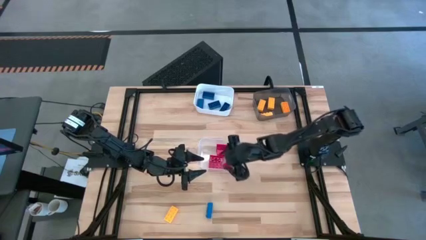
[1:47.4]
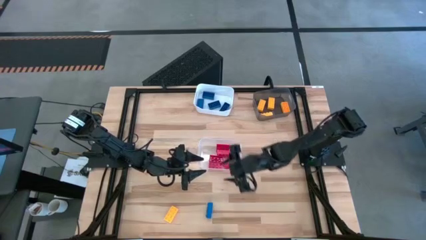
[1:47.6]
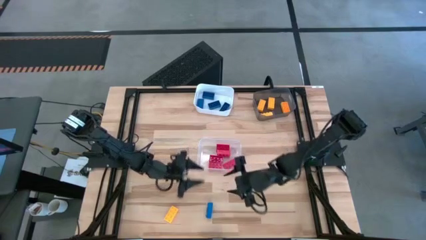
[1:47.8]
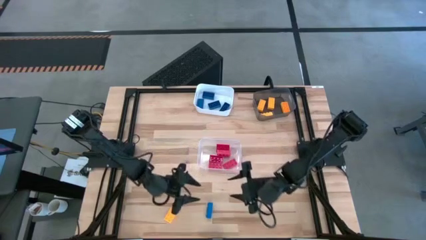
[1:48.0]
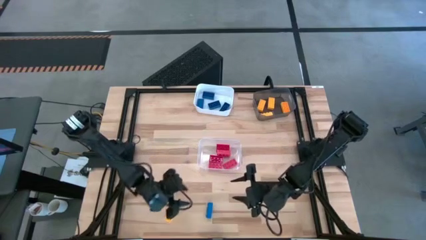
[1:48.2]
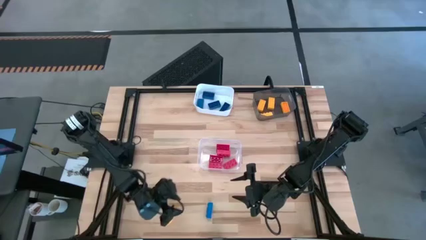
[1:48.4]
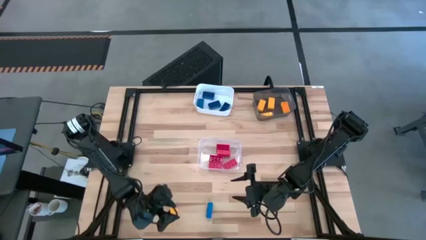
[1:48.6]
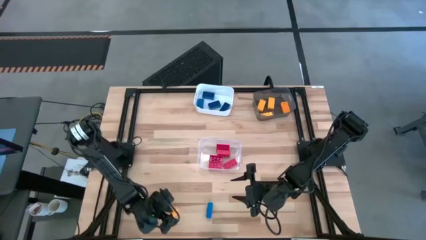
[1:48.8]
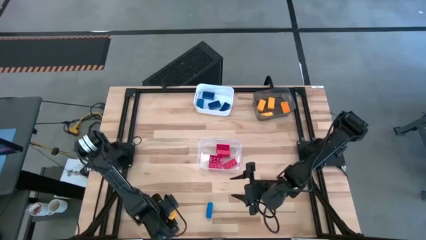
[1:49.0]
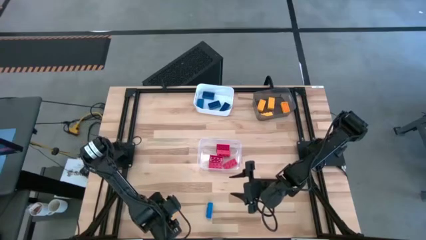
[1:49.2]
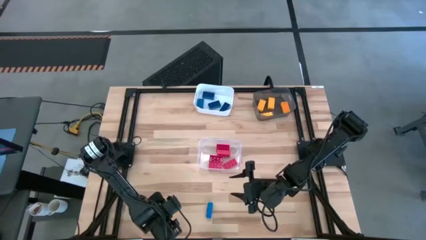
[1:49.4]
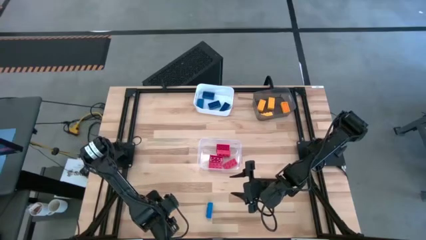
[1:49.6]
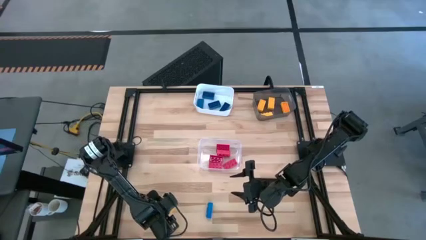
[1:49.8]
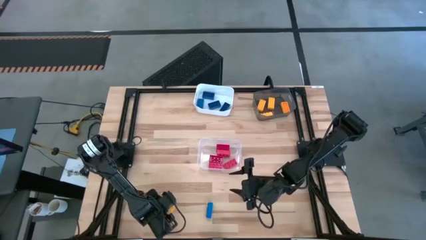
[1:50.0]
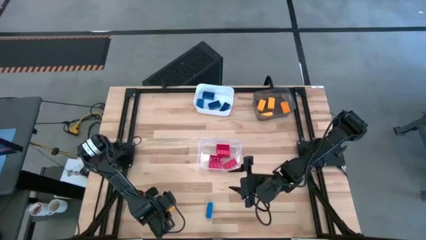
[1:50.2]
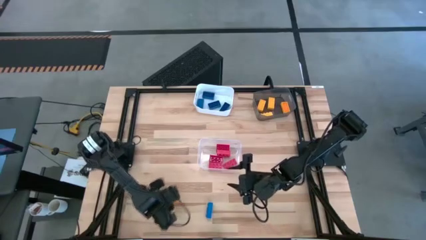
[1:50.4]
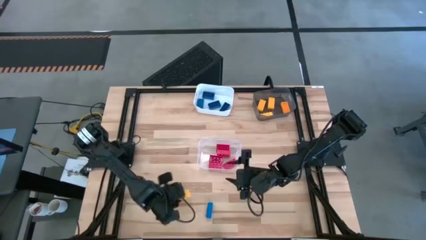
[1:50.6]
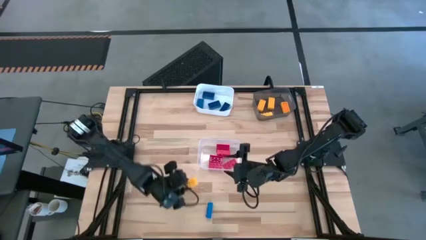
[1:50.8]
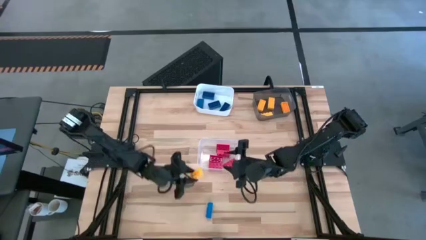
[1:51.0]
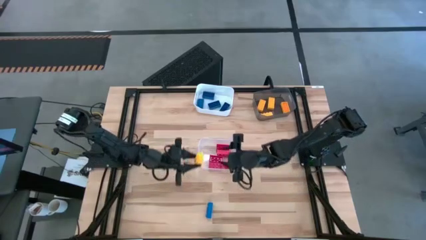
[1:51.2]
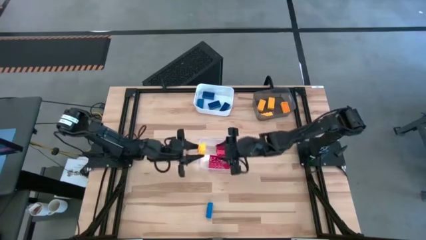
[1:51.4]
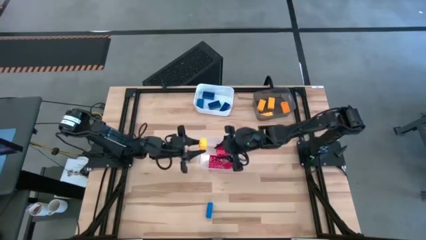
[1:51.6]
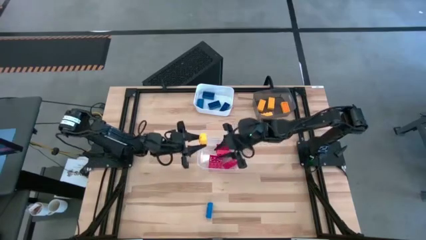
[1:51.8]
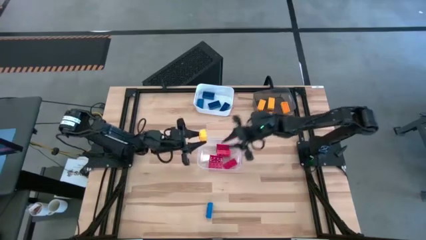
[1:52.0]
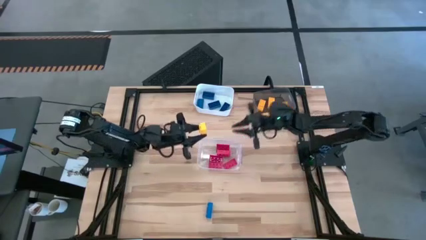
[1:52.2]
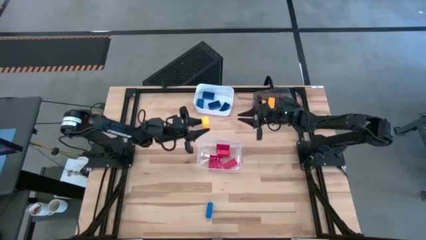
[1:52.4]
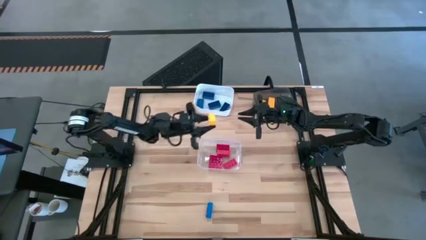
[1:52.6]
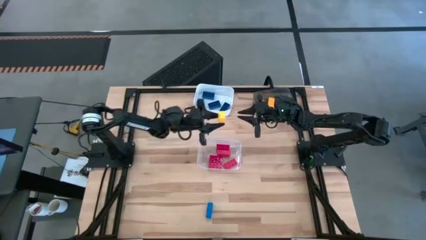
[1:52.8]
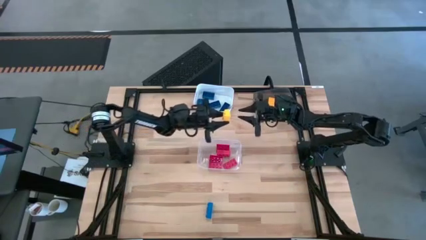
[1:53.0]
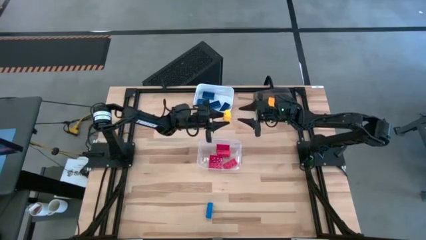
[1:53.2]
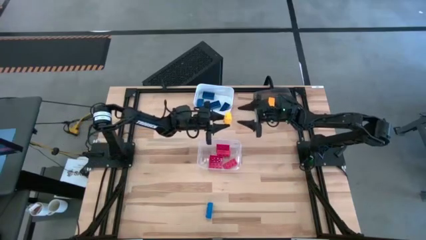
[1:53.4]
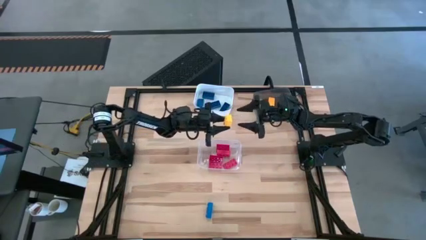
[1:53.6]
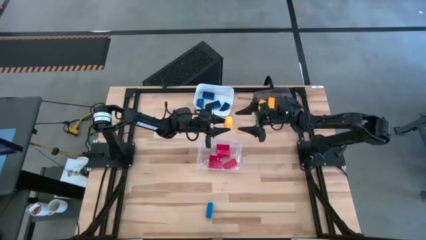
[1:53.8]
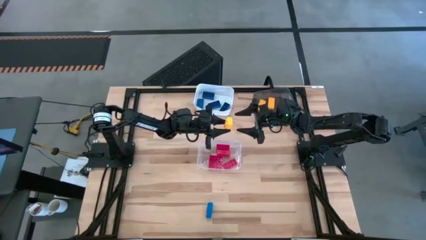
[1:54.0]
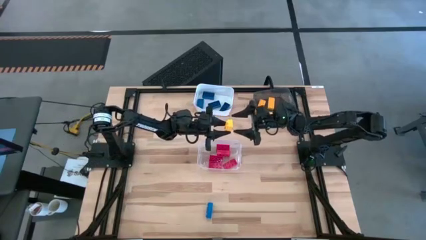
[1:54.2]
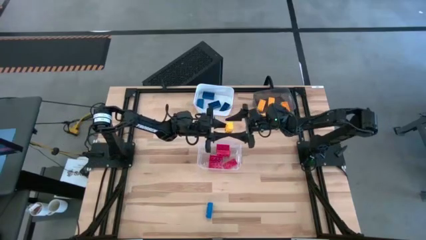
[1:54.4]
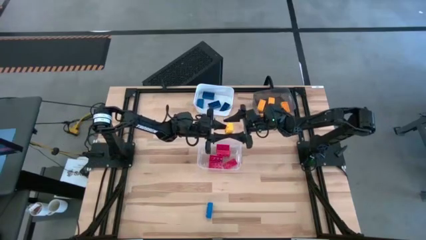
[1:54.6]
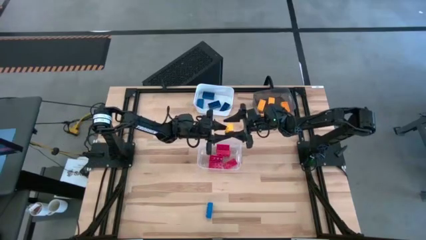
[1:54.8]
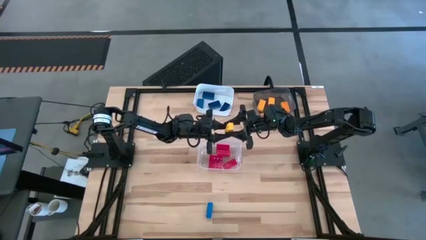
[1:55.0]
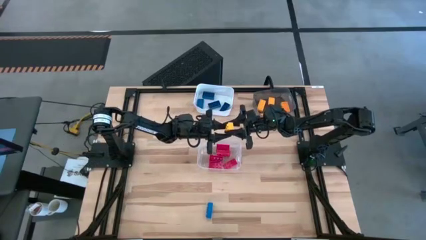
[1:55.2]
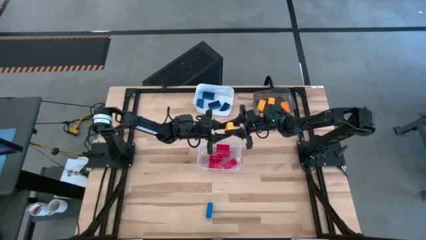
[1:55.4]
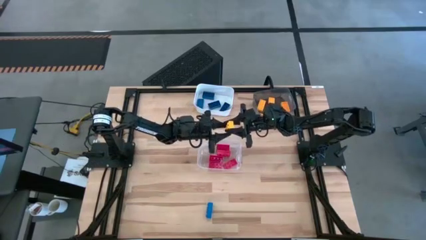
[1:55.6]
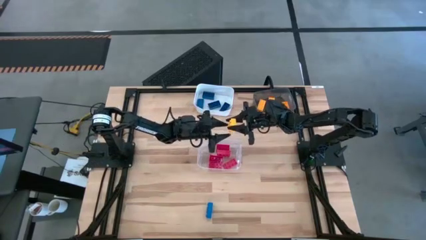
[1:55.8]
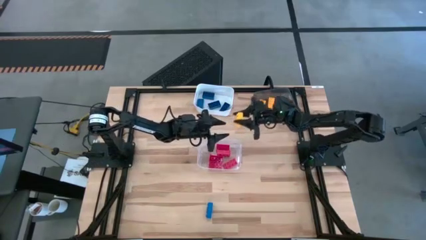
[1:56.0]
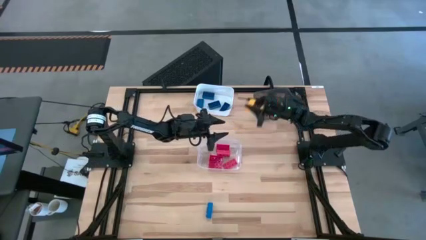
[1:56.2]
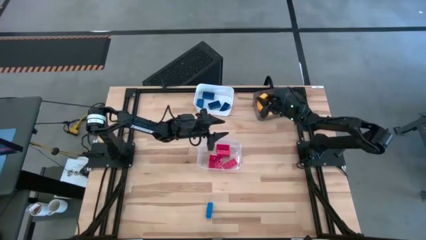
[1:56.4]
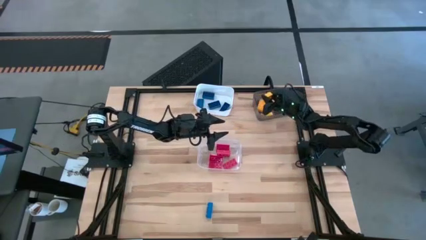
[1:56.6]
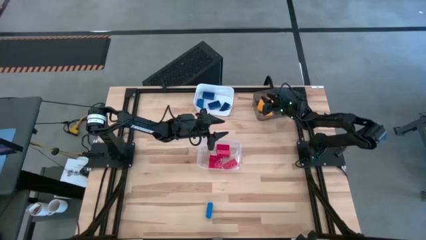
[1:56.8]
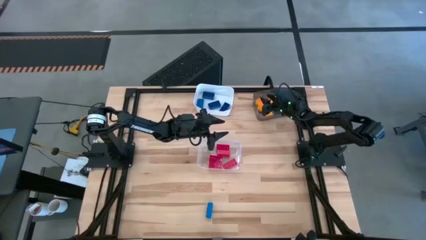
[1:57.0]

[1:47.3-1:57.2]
Task: Sort & place blocks by color
Put the yellow block into the black bin

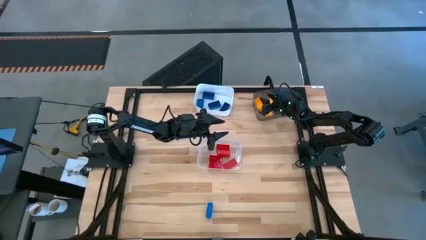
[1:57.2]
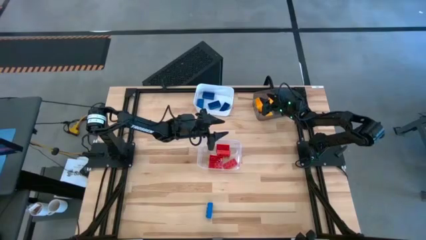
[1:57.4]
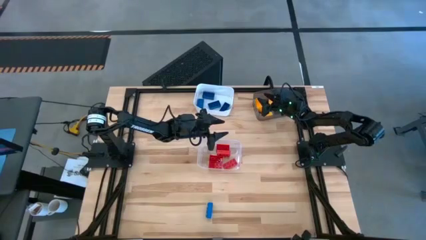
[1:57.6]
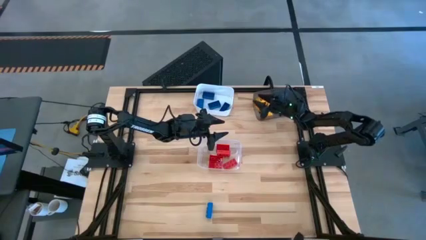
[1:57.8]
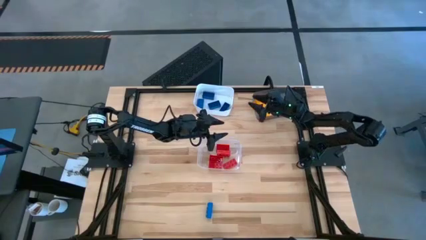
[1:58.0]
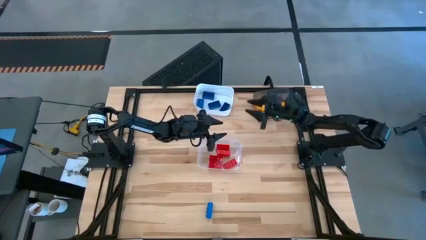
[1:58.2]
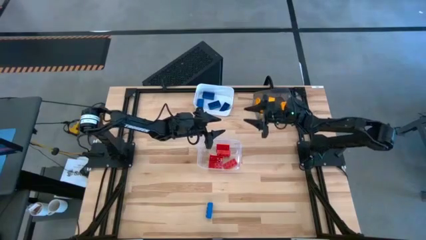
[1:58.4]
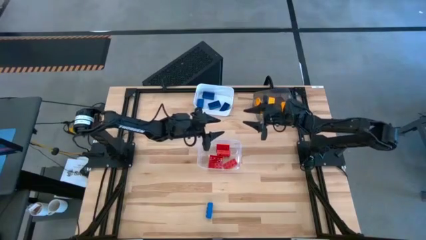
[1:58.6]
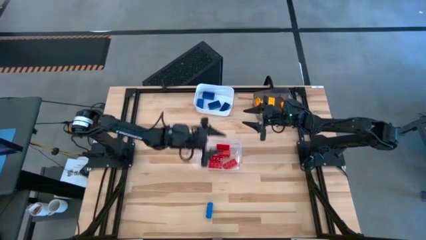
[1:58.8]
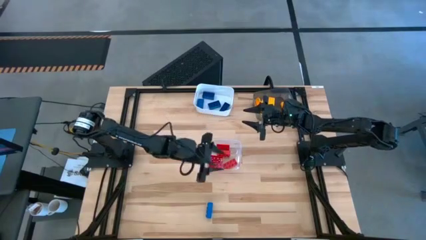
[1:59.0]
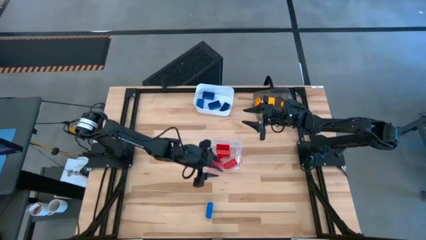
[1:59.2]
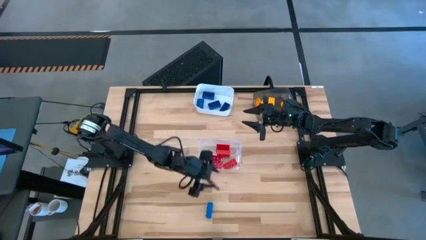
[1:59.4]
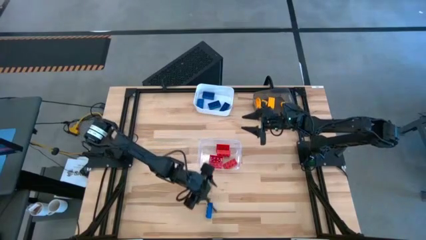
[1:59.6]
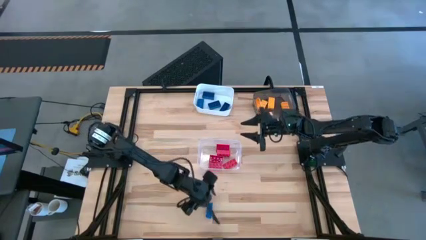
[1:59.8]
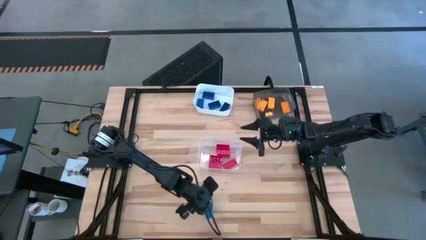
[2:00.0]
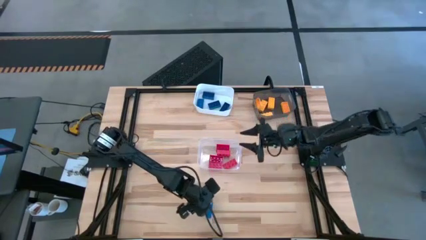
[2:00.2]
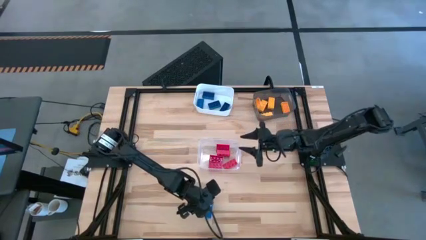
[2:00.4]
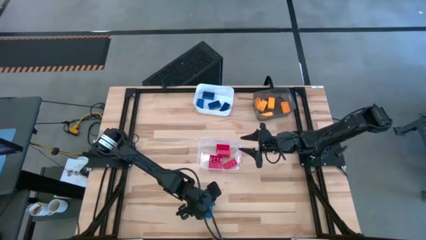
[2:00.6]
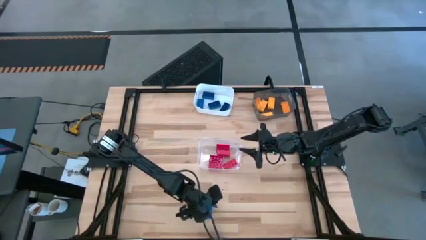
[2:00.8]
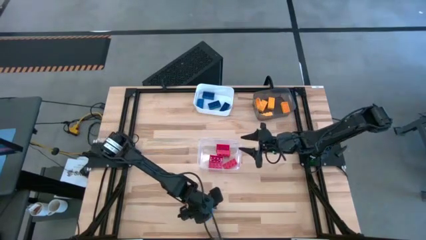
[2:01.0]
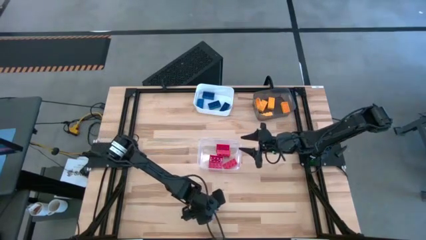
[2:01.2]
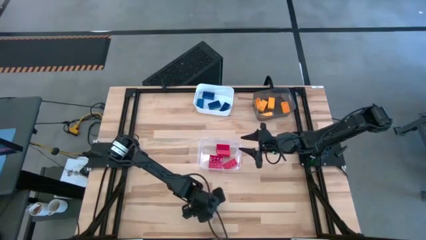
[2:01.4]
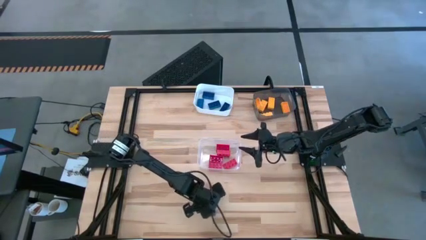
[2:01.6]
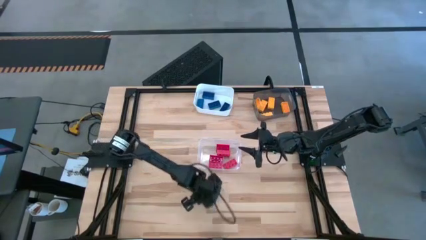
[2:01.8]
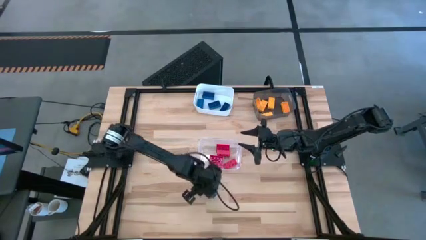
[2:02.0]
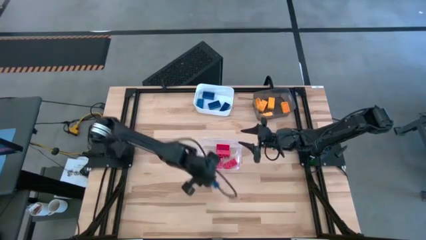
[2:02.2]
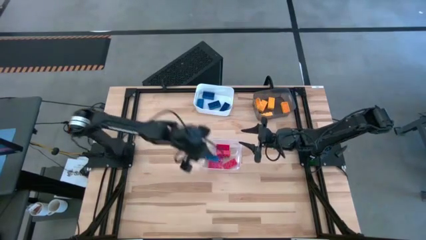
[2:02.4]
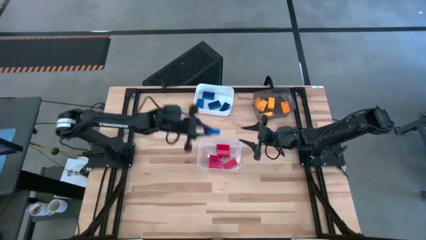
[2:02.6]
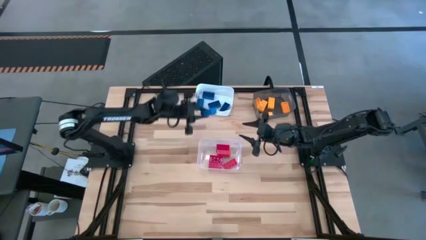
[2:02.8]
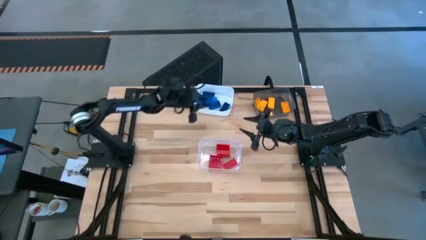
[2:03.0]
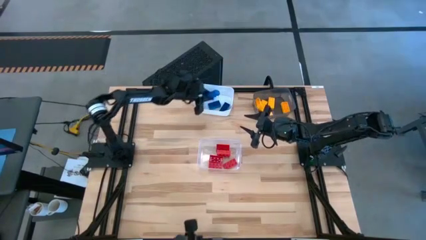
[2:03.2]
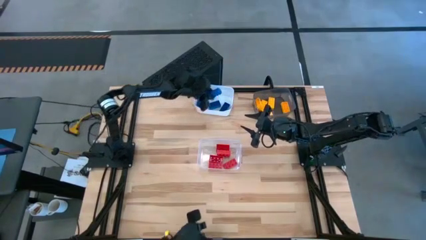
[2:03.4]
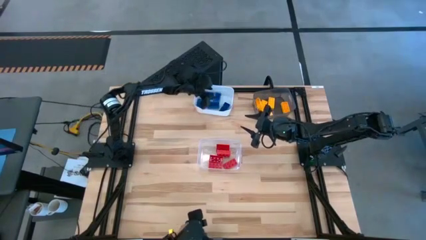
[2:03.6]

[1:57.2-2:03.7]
Put the blue block into the white bin
